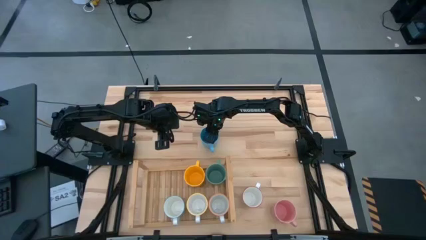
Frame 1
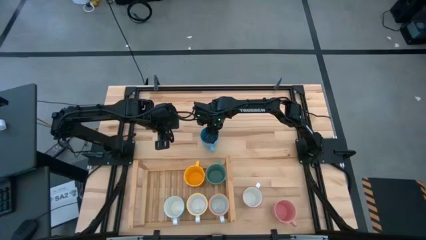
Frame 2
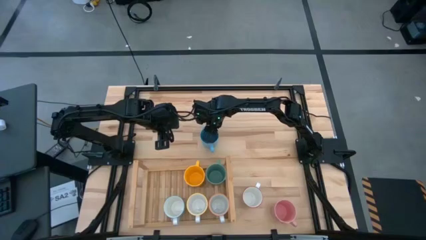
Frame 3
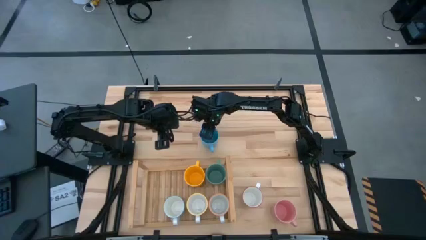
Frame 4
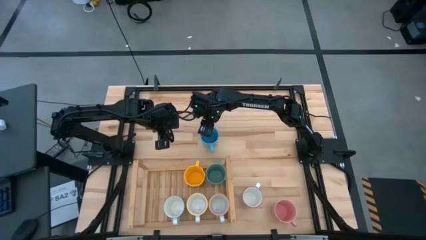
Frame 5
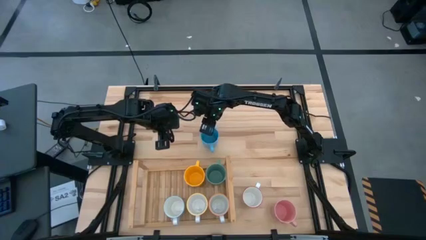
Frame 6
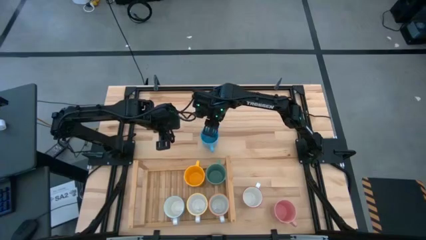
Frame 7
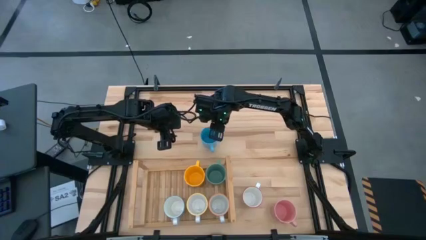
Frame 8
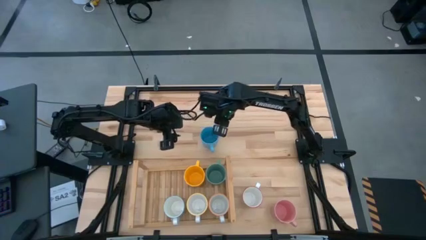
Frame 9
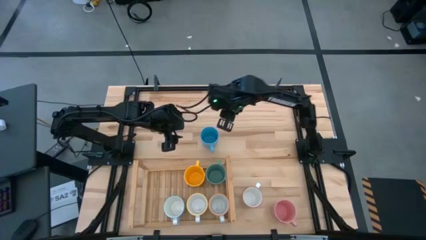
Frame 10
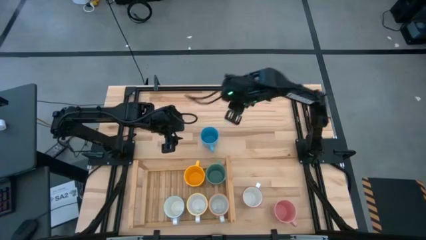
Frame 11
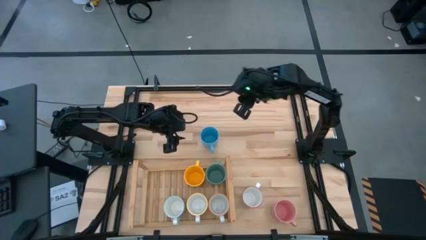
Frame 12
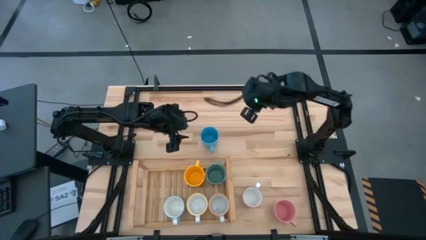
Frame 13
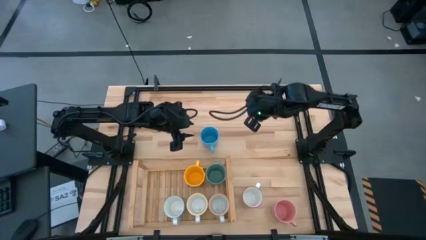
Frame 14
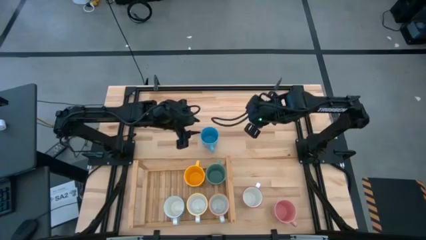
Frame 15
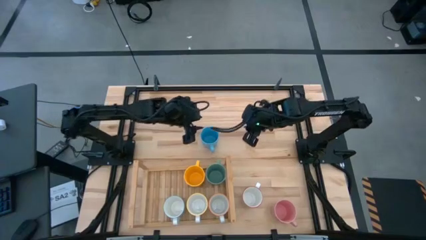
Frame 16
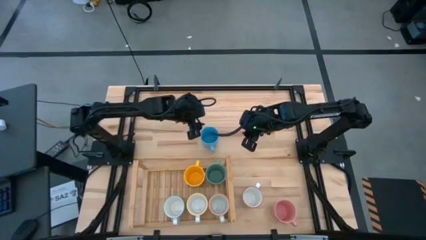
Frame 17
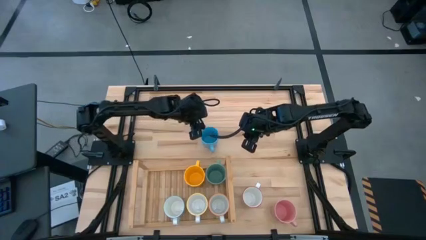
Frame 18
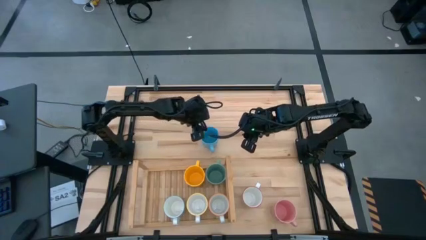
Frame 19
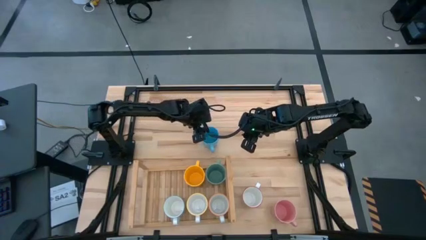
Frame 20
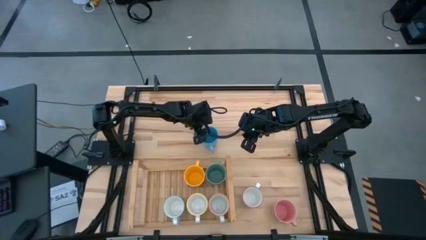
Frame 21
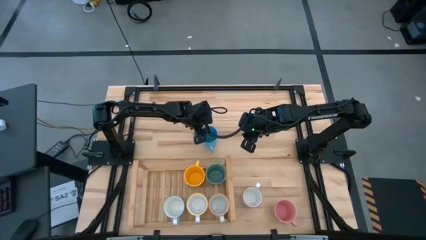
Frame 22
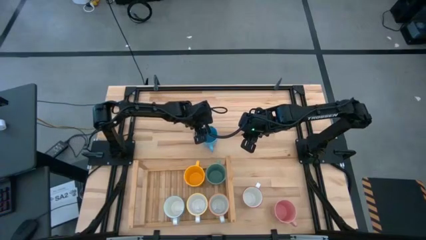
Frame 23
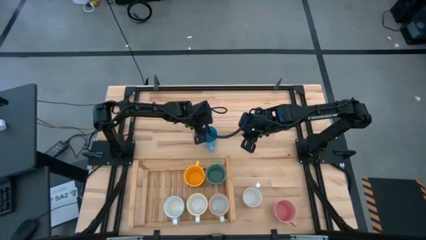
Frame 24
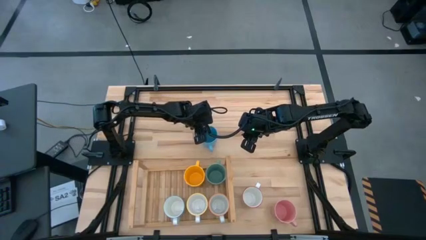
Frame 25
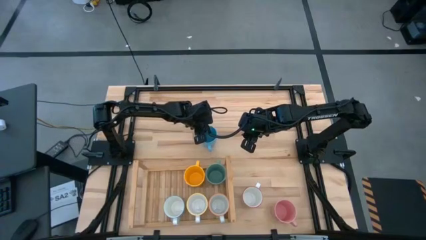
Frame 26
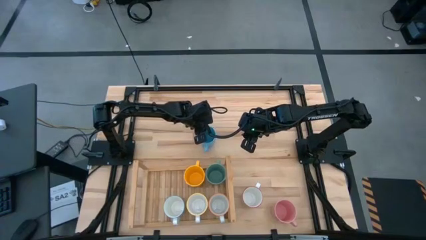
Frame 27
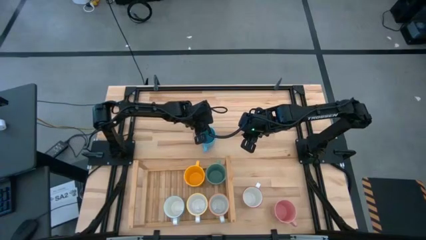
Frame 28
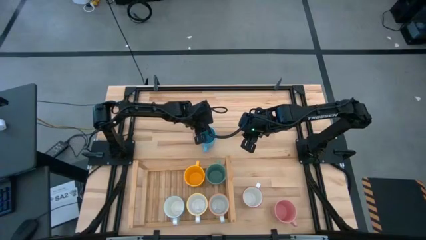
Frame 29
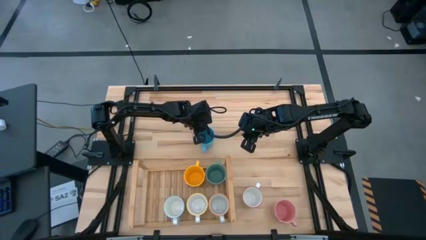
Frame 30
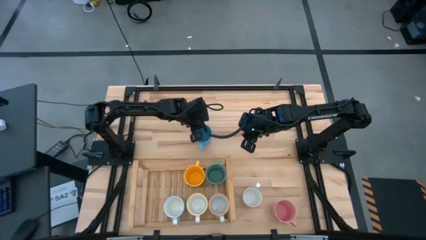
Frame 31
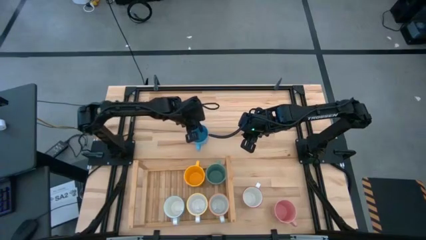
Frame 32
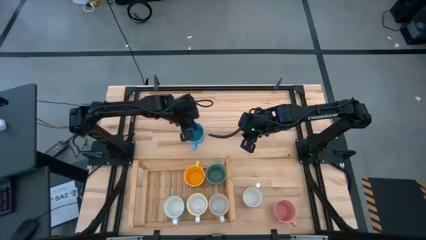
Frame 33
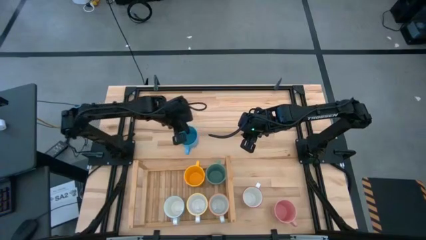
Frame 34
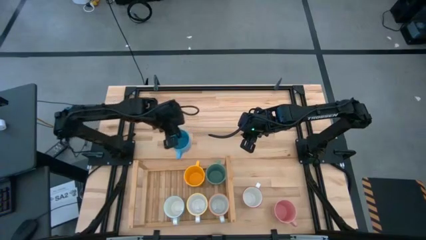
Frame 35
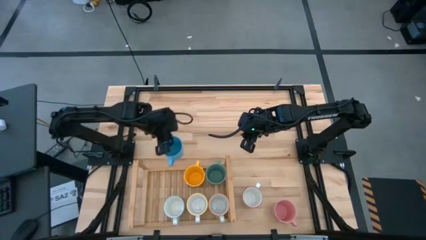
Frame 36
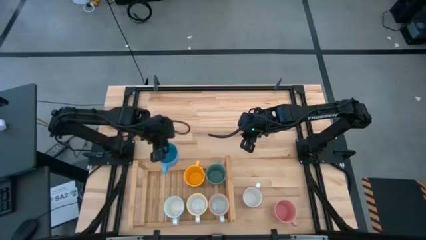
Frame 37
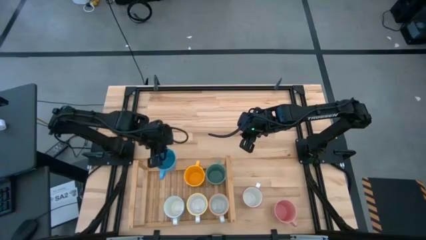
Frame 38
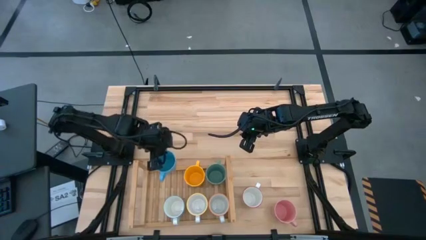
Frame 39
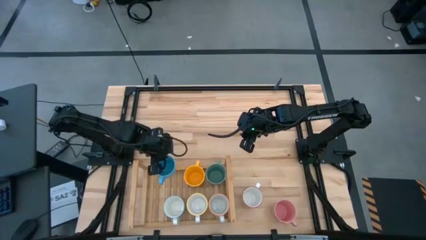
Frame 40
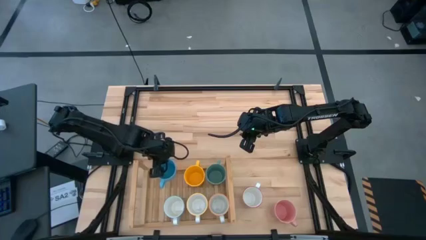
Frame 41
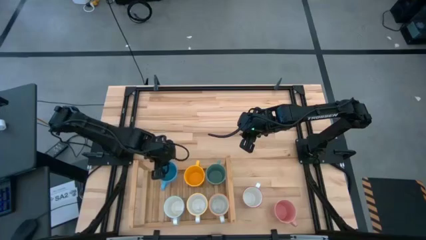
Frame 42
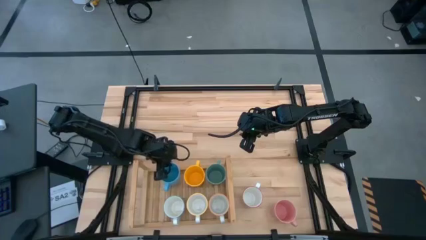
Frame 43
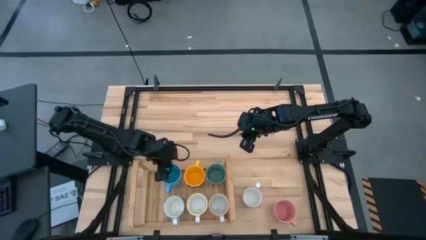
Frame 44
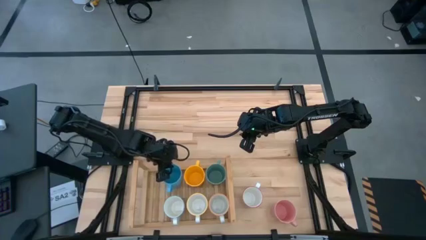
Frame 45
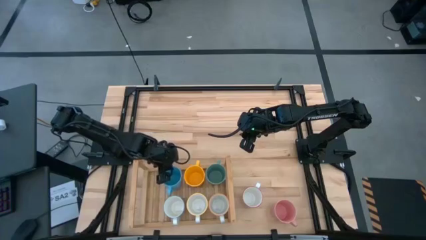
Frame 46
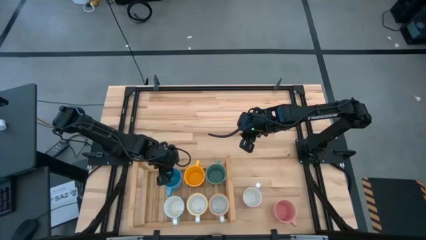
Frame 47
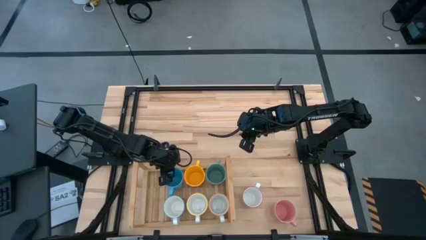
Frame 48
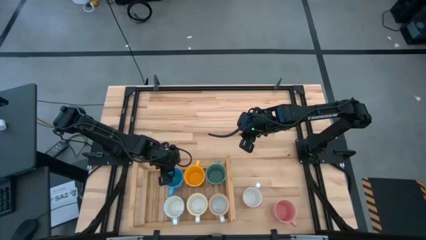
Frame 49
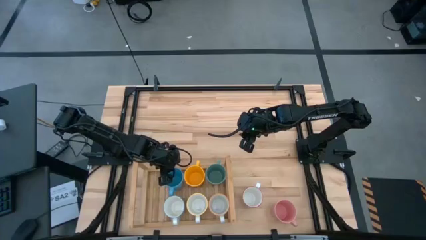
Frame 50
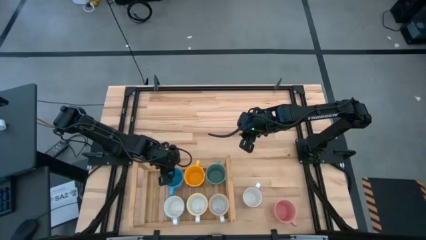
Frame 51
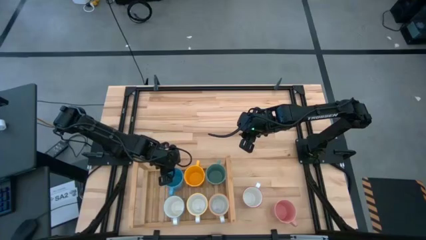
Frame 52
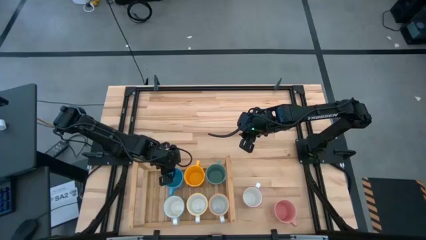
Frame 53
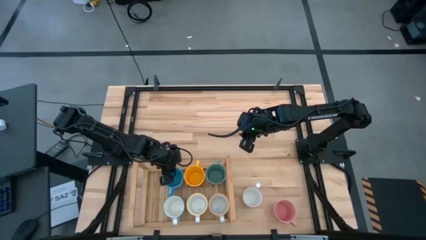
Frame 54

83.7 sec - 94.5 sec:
Task: Place coffee mugs
Put the blue mug on the shelf

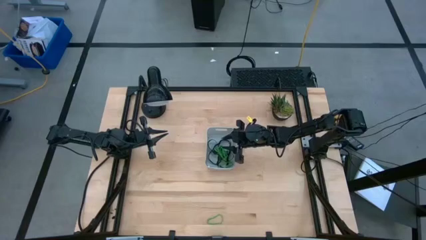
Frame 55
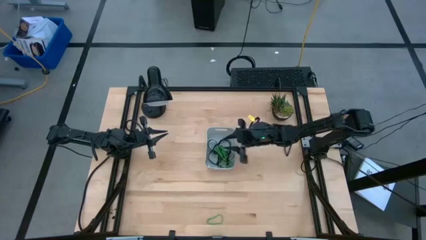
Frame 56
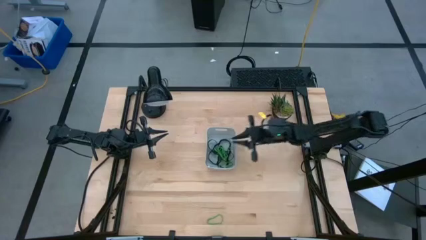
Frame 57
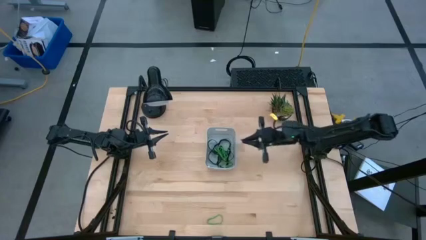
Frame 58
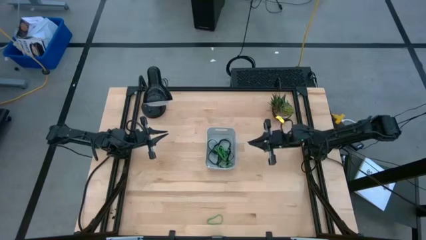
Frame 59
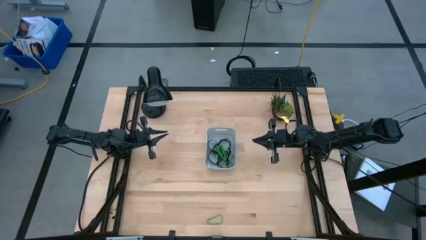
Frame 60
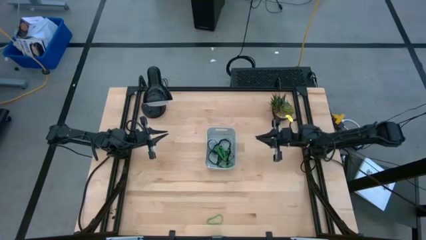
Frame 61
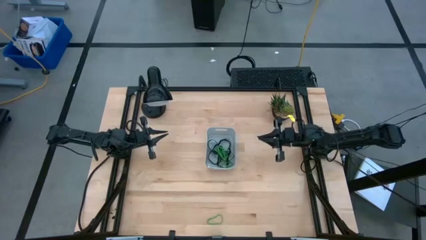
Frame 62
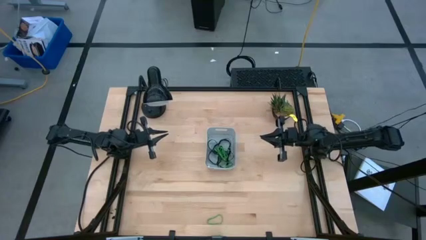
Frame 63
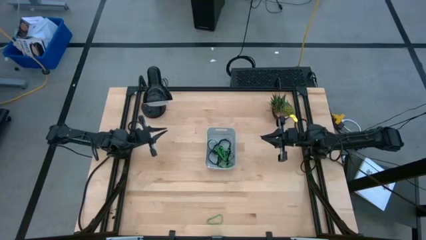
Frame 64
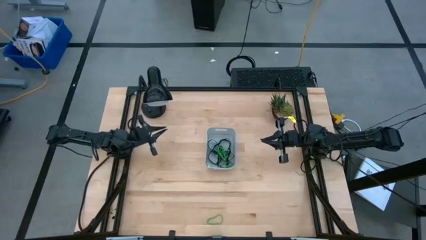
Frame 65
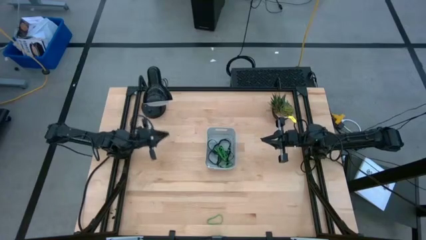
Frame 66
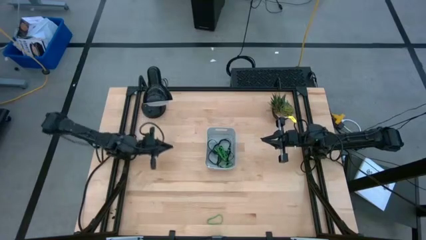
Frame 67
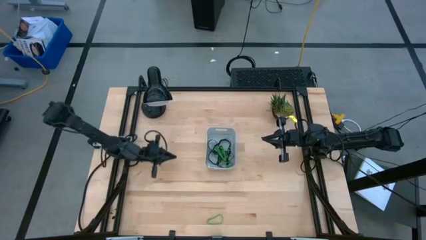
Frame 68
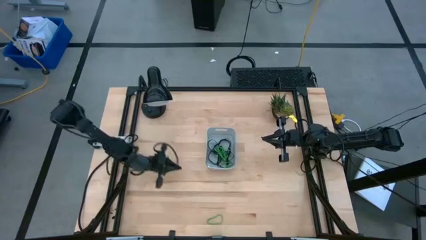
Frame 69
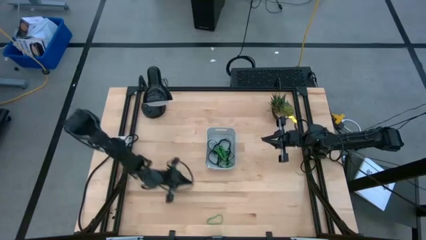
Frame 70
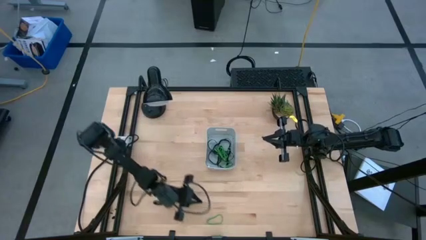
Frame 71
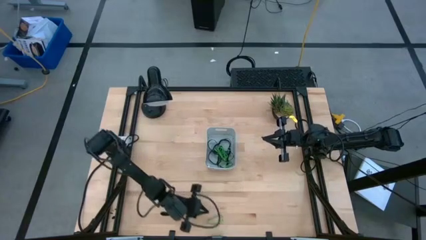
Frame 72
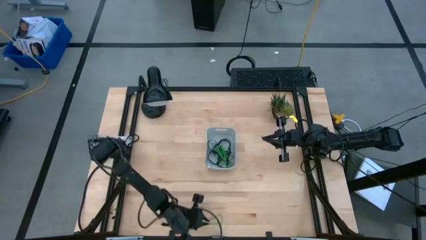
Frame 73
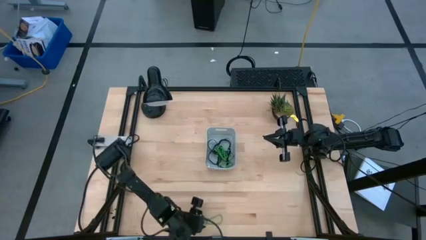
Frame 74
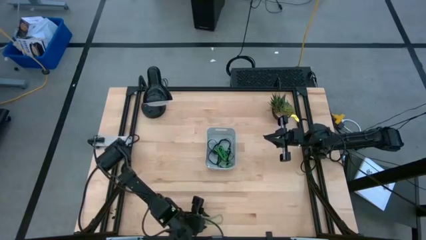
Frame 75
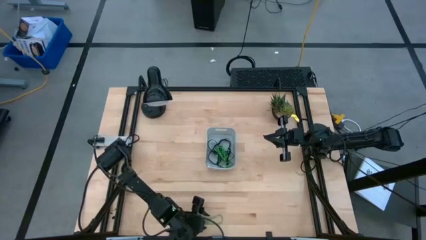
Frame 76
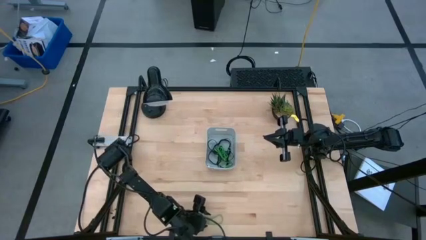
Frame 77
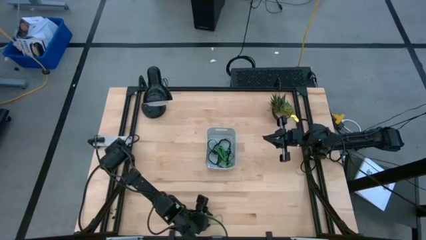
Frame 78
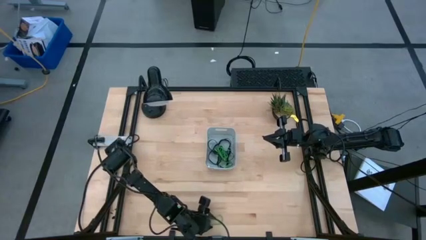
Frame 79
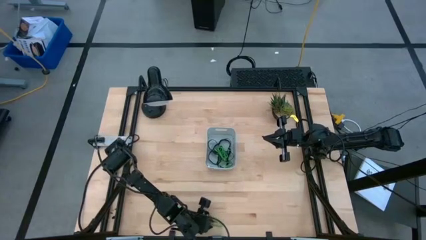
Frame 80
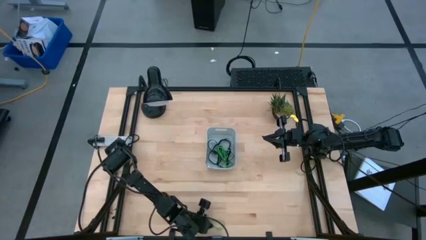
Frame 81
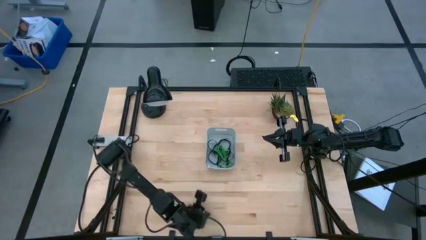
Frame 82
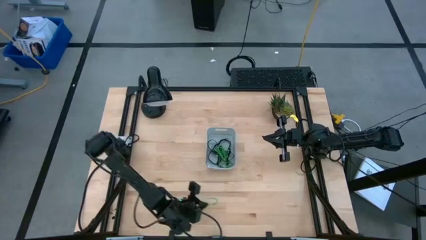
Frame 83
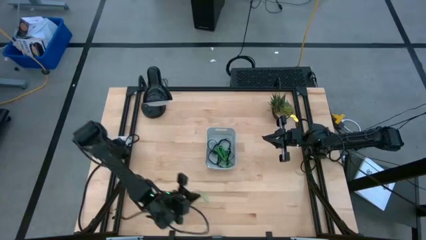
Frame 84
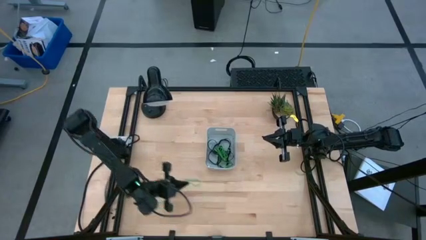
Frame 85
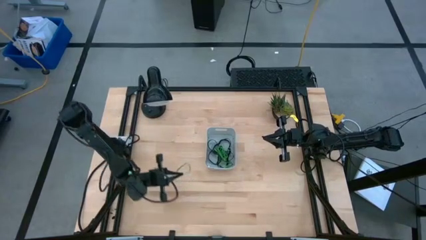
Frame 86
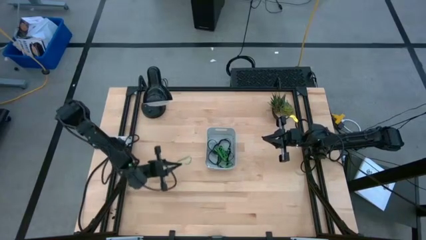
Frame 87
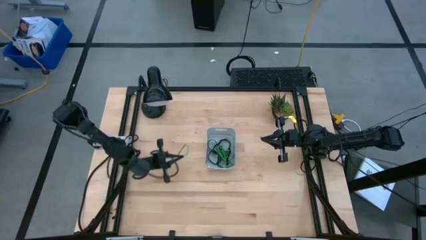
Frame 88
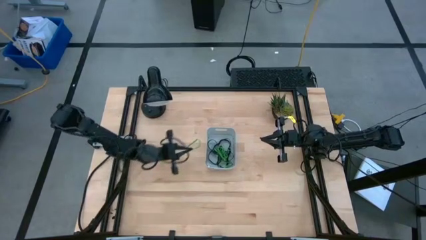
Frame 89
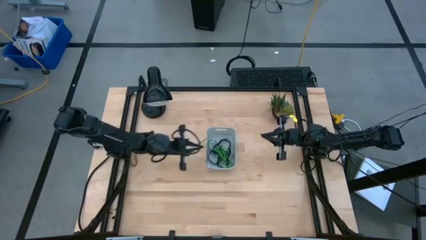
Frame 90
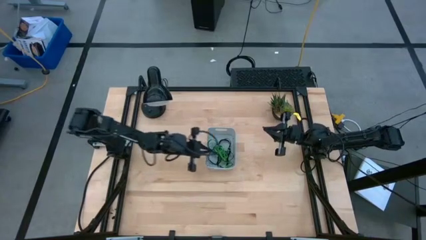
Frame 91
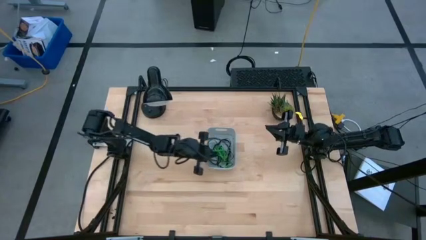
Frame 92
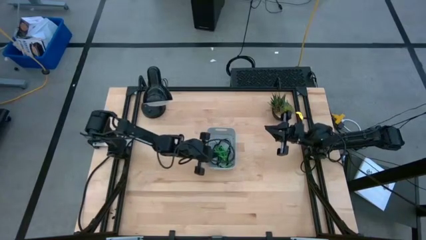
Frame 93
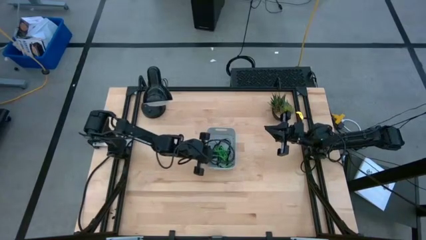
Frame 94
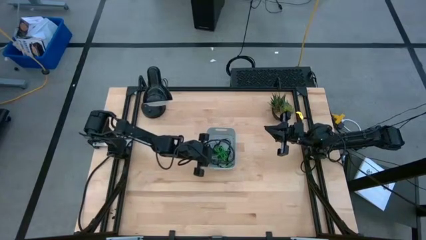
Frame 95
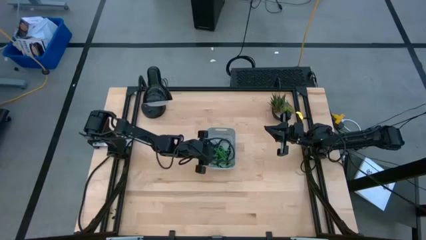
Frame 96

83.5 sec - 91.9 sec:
Task: Pick and place rubber bands into bin
Put the green rubber band into the gray bin
